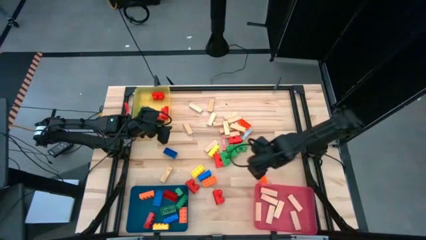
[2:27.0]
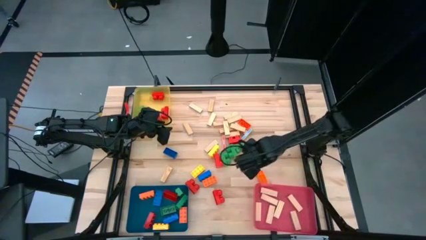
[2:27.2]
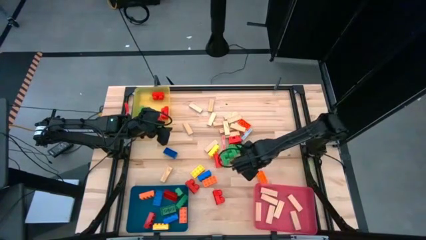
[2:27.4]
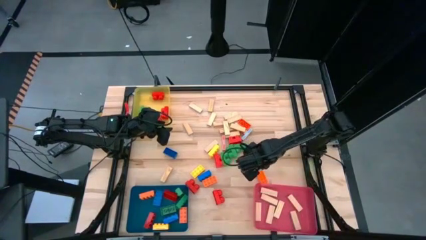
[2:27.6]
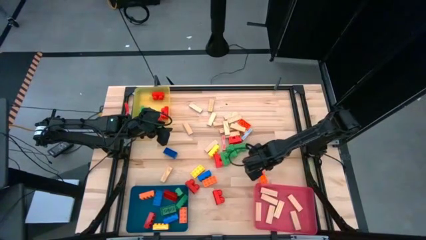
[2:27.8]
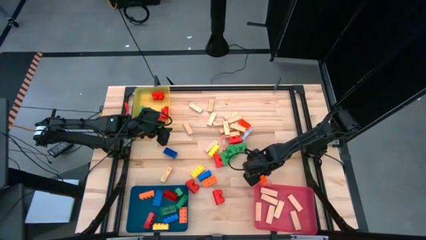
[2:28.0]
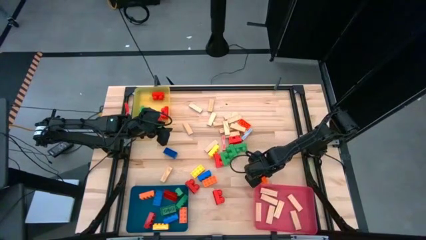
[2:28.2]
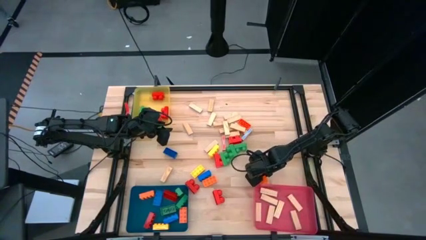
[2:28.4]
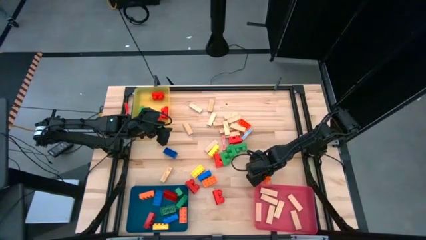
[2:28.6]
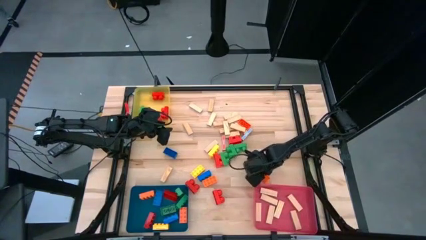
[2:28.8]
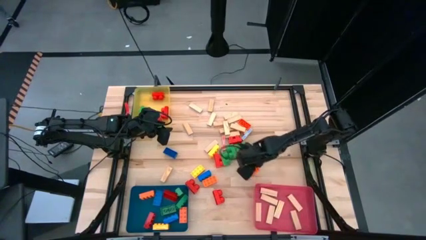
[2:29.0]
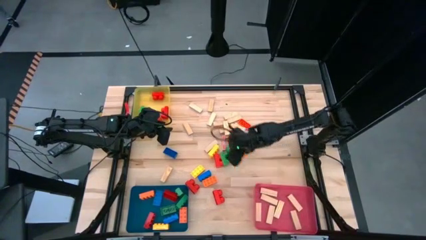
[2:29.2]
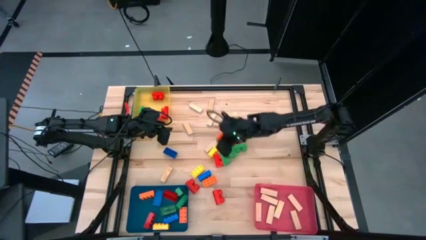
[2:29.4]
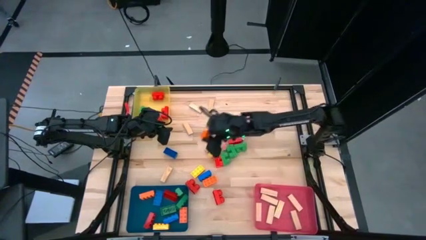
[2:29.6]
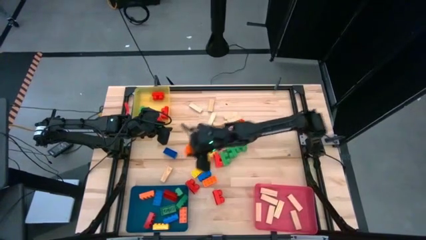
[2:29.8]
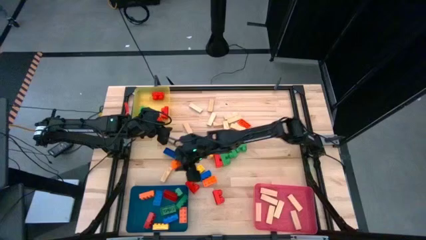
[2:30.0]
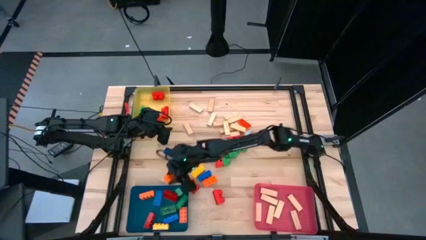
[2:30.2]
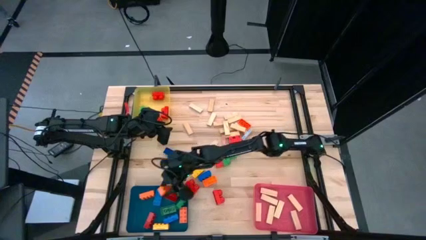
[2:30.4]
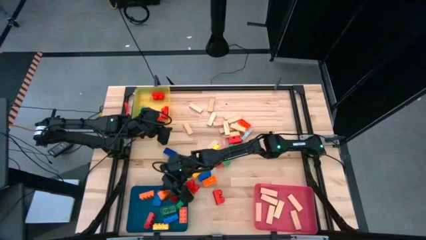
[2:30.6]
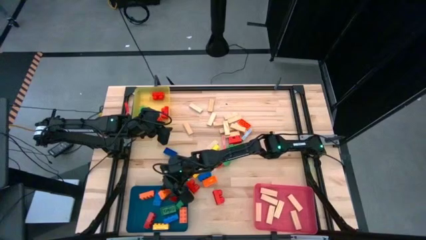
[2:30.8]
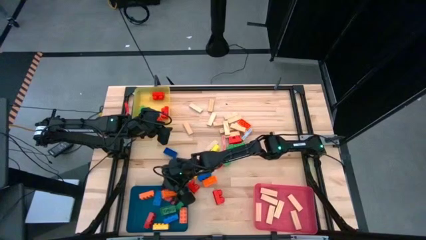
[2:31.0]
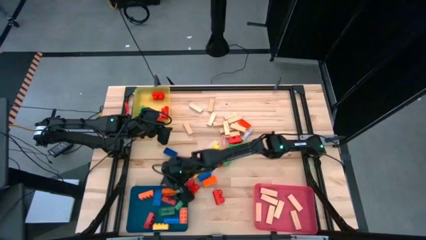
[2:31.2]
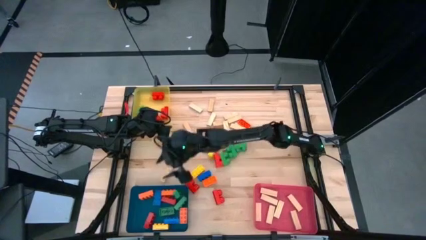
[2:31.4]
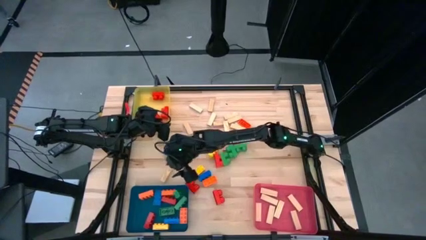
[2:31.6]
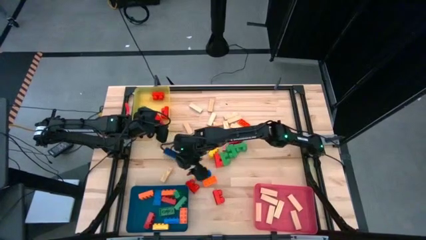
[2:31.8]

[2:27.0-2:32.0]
Task: Sort blocks by size
Put the orange game piece into the blue bin

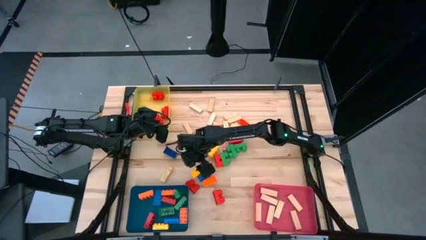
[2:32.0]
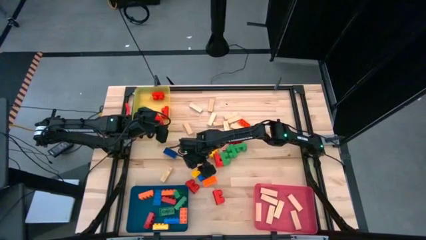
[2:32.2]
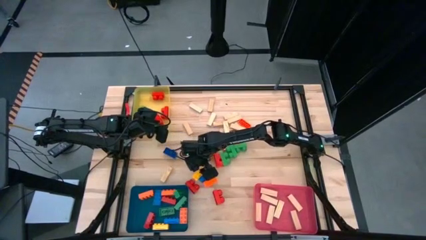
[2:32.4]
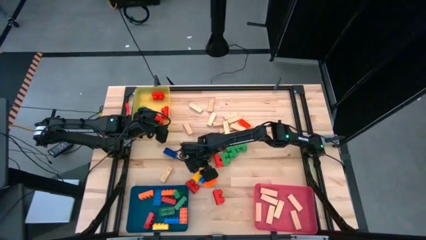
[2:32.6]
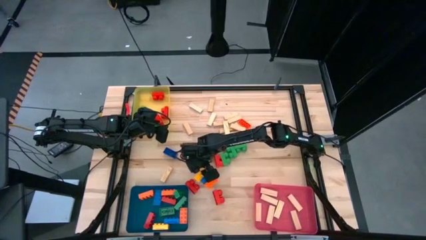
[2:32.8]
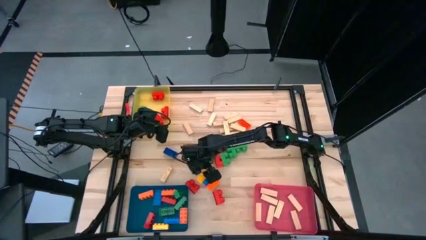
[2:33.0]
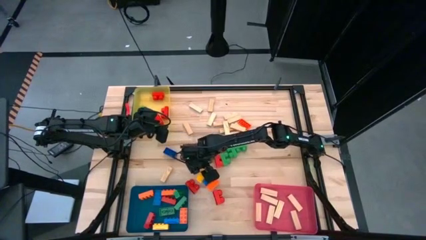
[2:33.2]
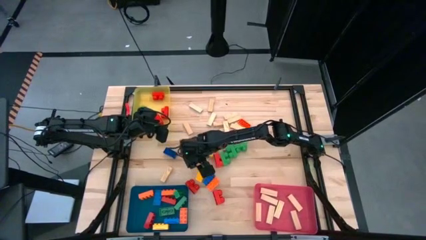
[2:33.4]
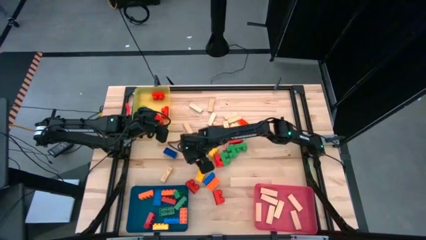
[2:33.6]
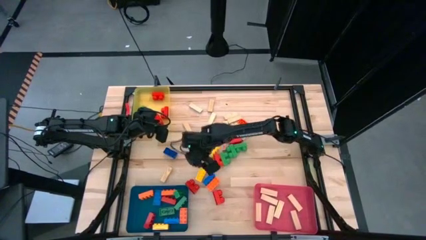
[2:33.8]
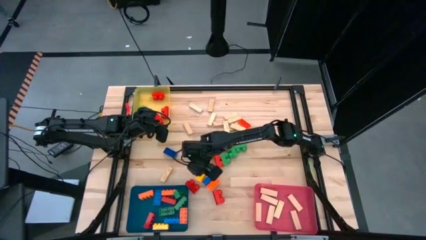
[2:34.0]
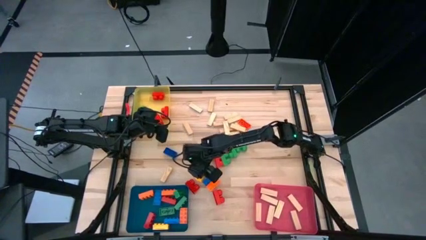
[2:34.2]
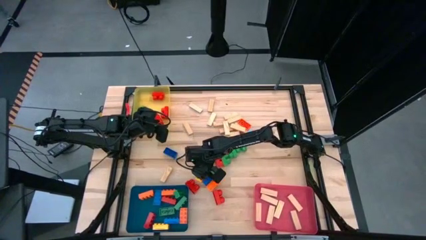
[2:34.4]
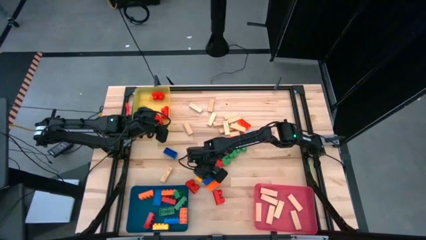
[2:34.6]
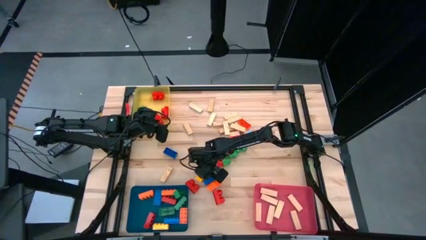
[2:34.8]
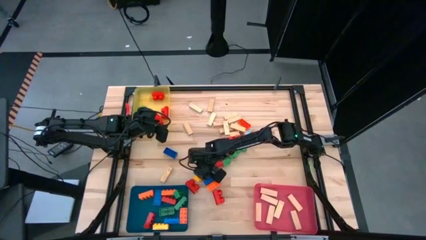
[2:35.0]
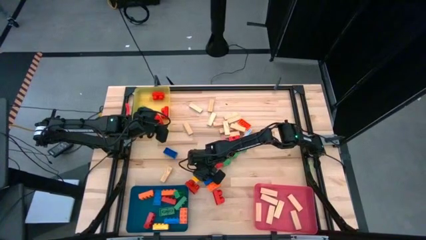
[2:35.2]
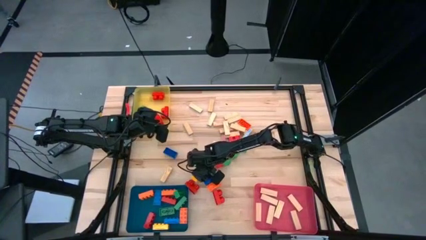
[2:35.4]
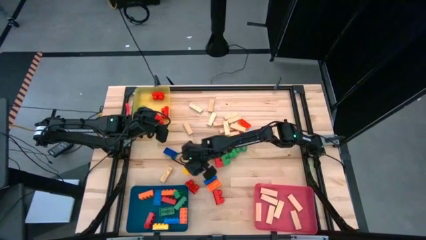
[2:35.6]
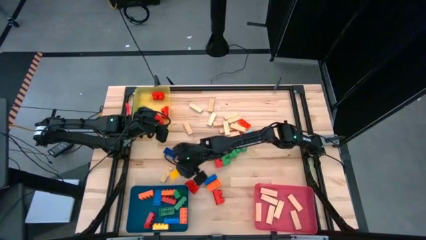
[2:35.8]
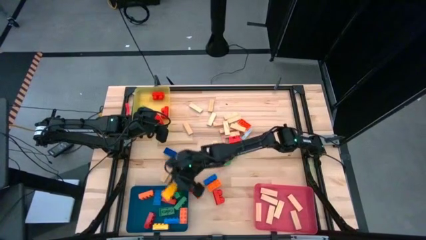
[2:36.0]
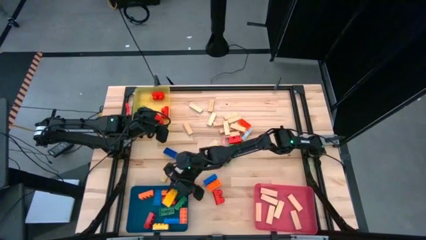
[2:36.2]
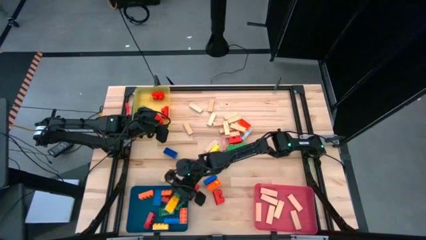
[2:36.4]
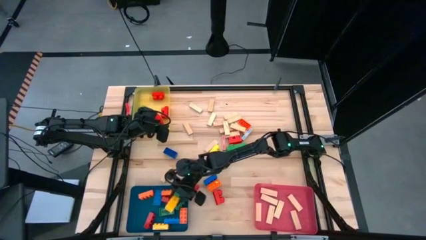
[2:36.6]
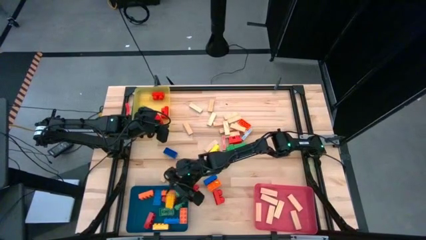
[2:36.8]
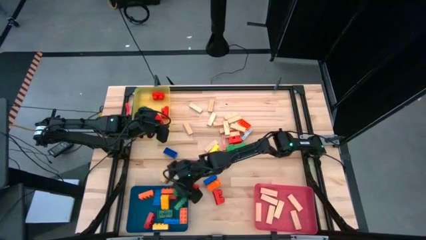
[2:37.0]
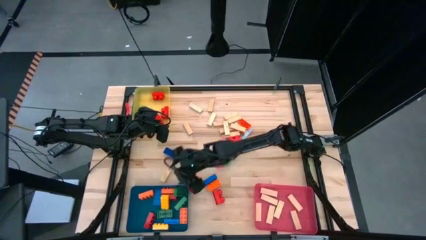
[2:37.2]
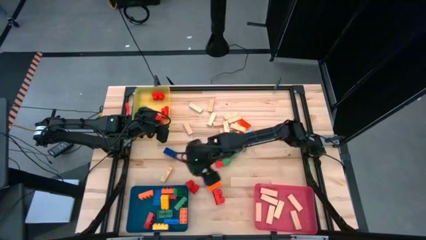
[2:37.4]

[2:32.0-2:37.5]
Put the yellow game piece into the blue bin

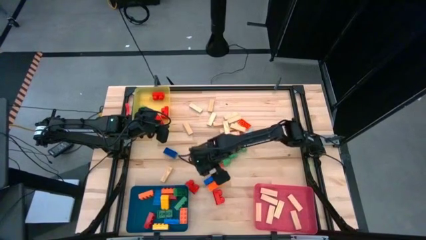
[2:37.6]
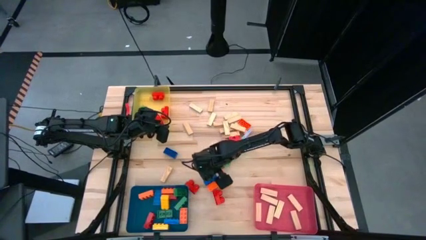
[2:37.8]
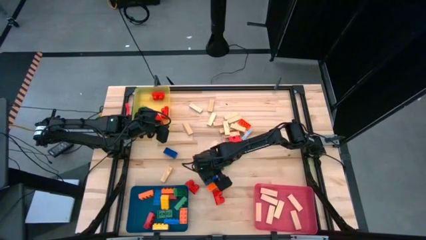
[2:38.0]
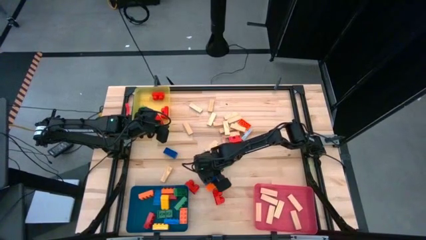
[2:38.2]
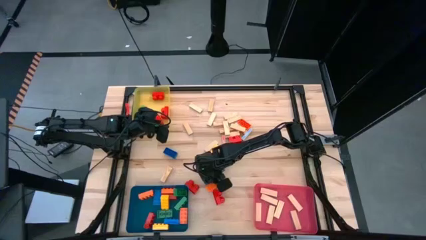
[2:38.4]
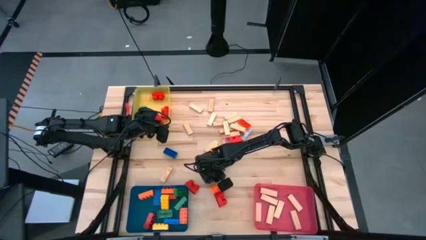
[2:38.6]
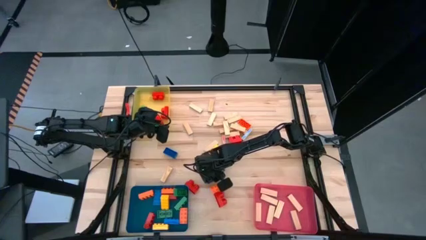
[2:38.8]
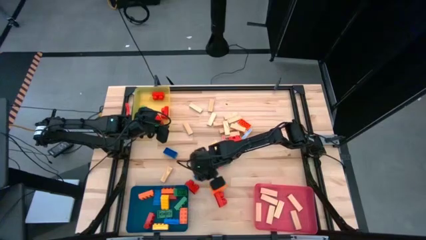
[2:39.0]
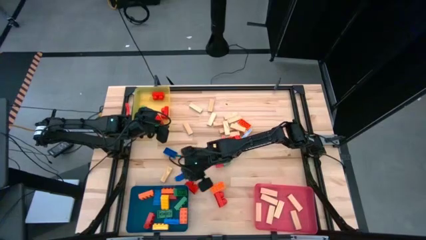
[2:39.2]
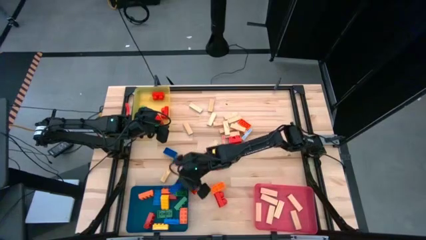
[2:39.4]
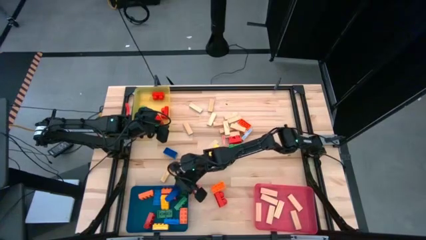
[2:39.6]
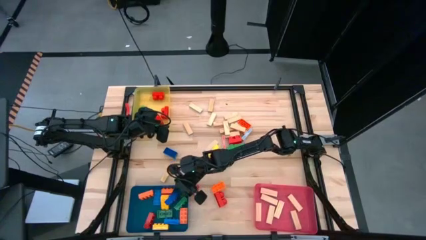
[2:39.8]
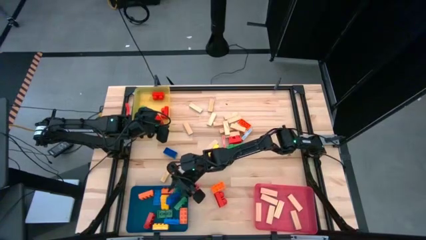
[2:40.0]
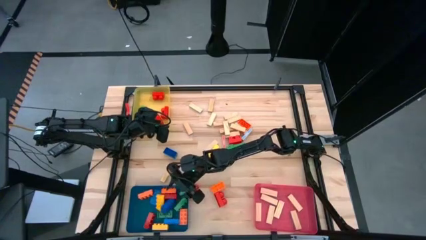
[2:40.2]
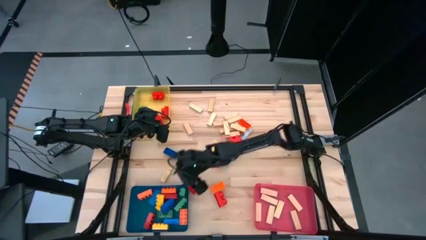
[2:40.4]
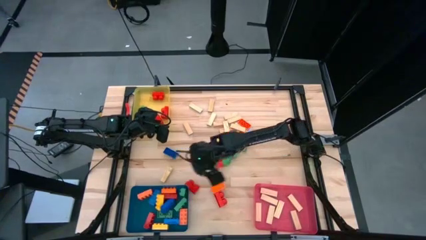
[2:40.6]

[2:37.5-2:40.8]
Put the blue game piece into the blue bin

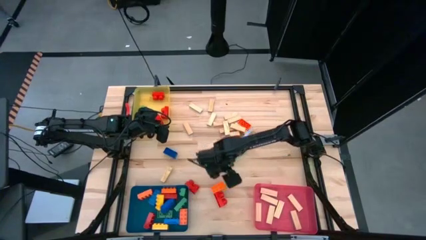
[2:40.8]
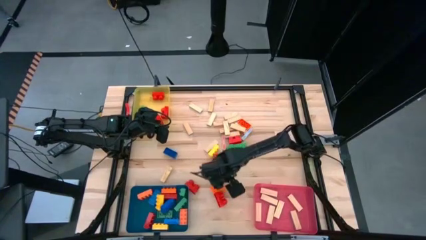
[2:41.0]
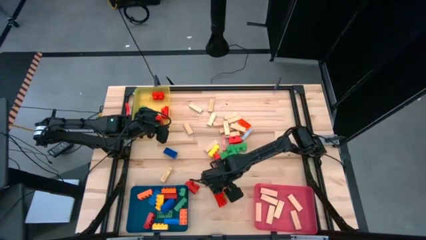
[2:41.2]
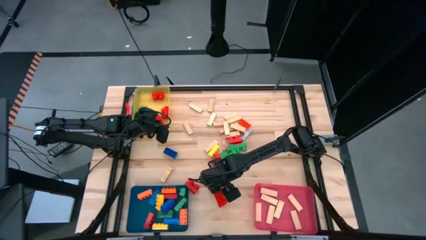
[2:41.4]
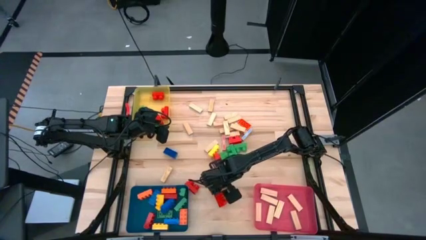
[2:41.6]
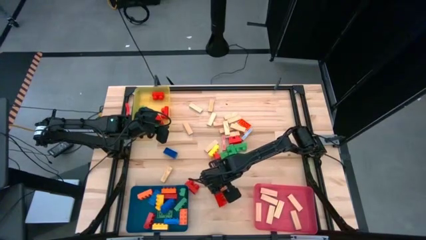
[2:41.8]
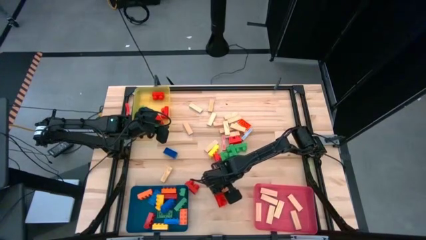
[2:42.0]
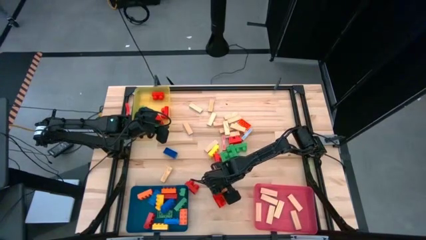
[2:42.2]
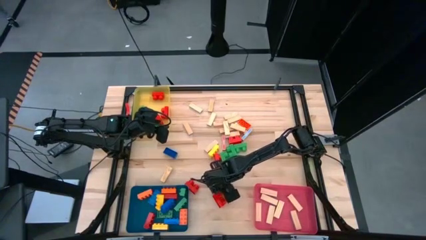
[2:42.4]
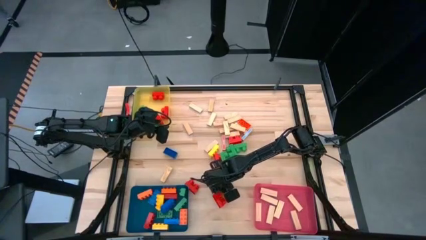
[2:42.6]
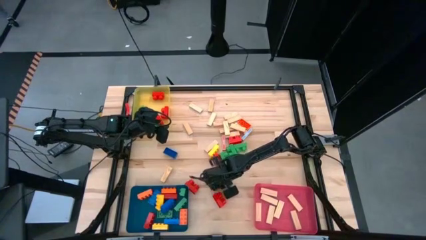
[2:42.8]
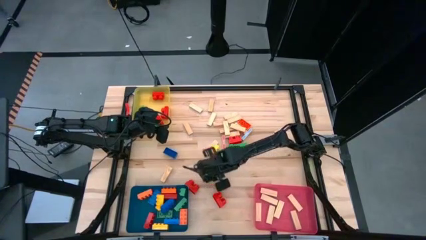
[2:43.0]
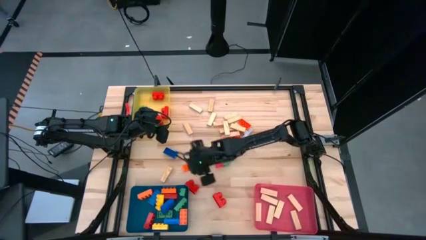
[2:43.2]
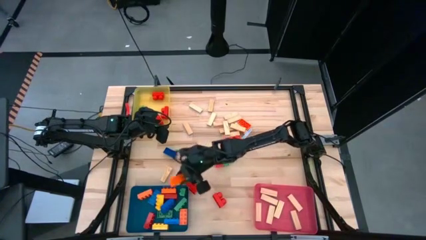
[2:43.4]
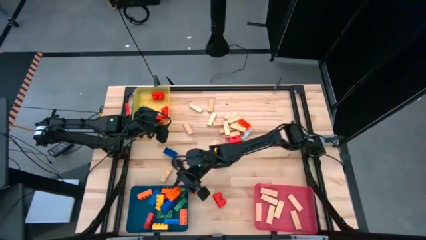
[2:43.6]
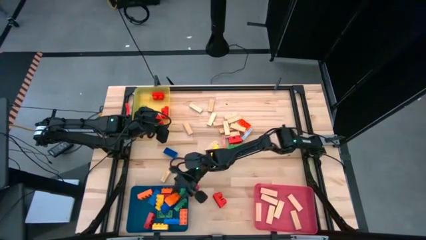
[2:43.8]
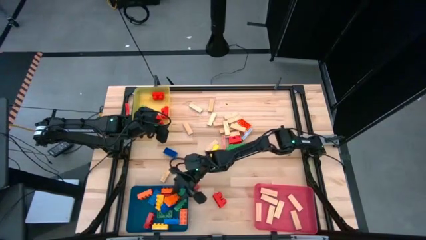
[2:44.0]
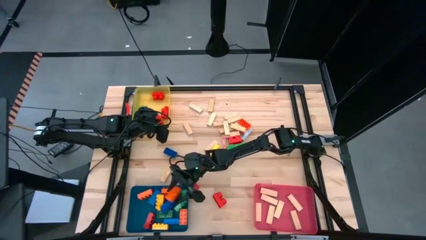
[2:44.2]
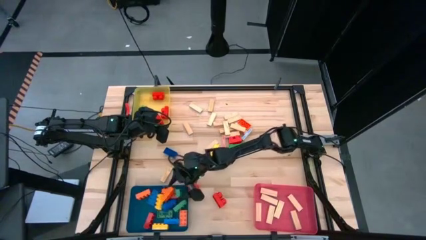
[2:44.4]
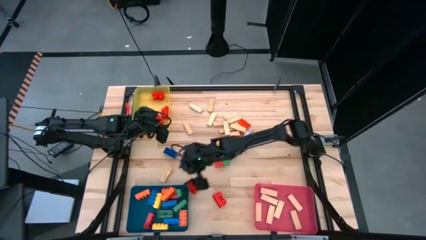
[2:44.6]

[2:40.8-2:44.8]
Put the orange game piece into the blue bin
